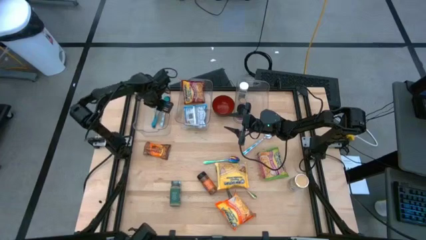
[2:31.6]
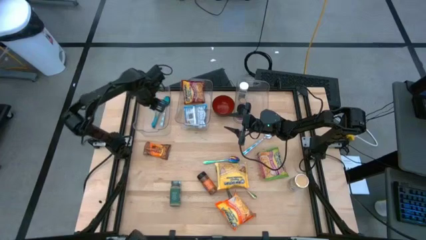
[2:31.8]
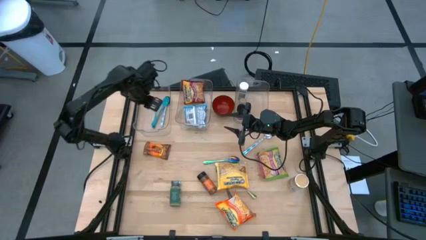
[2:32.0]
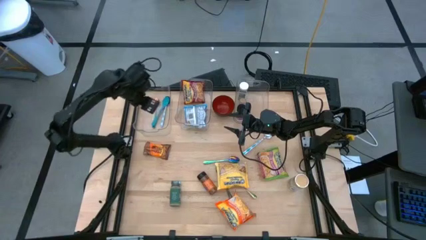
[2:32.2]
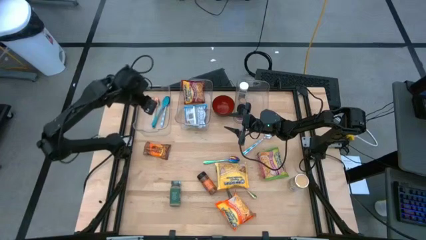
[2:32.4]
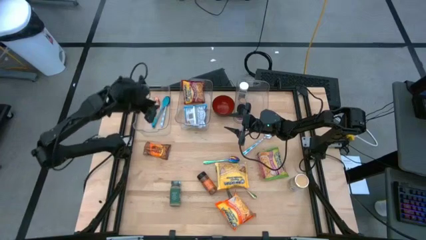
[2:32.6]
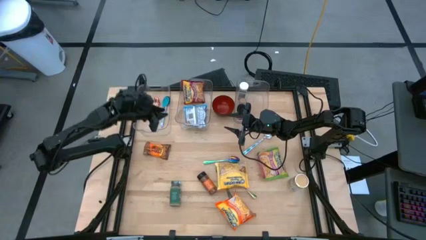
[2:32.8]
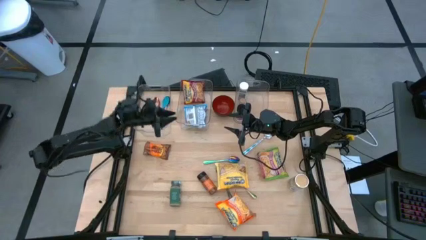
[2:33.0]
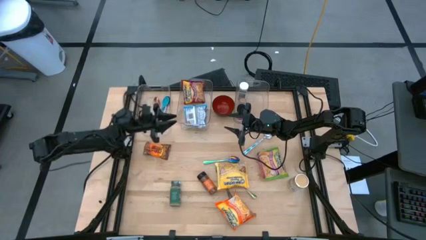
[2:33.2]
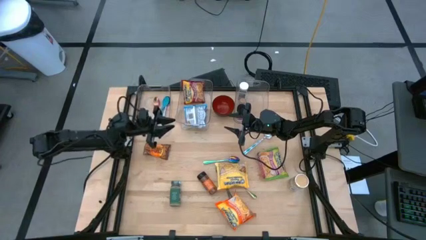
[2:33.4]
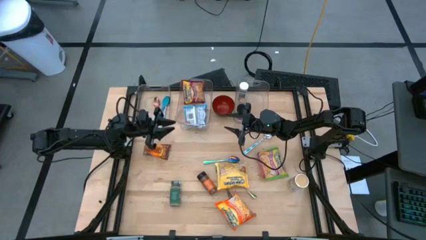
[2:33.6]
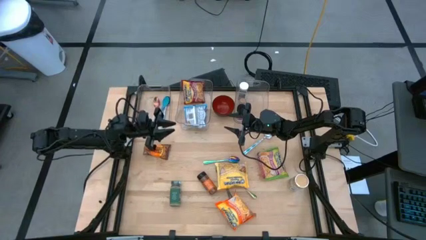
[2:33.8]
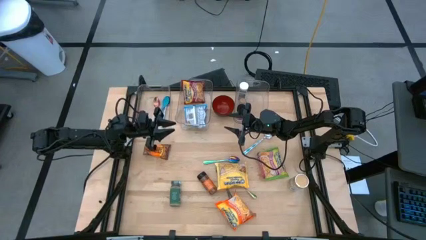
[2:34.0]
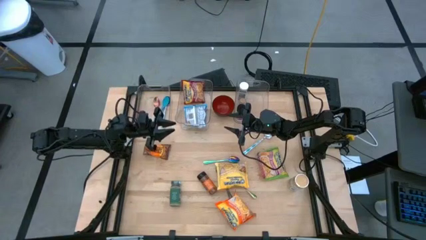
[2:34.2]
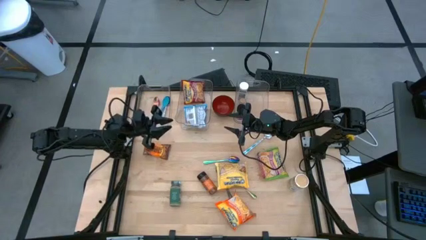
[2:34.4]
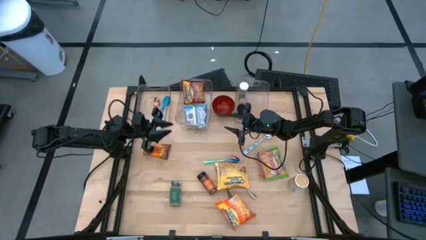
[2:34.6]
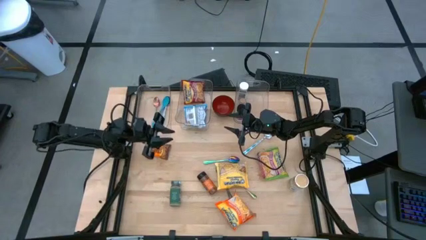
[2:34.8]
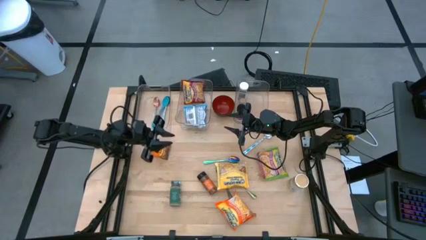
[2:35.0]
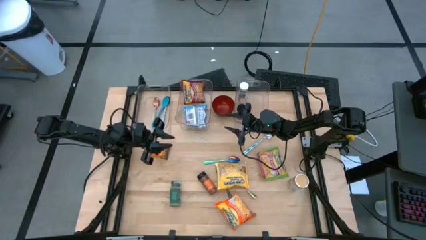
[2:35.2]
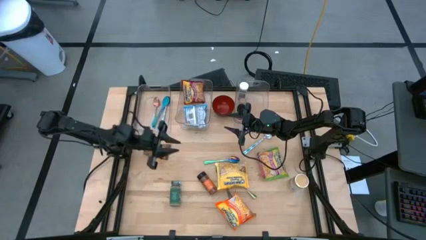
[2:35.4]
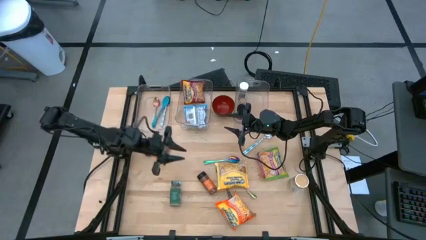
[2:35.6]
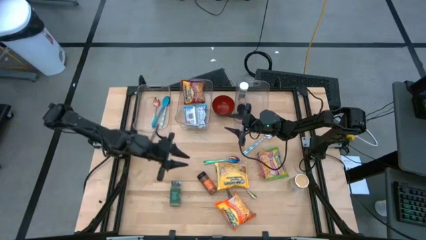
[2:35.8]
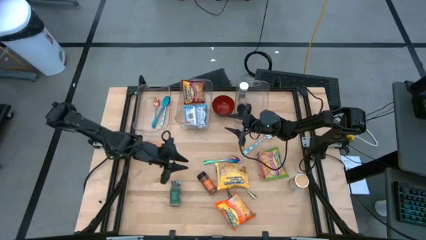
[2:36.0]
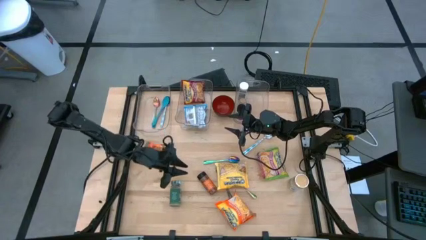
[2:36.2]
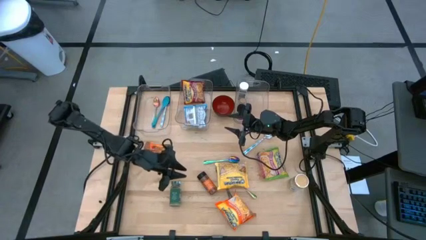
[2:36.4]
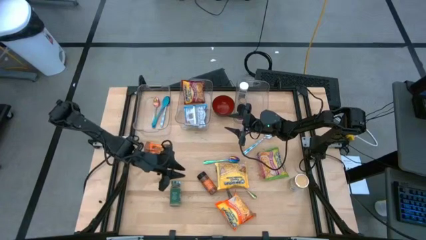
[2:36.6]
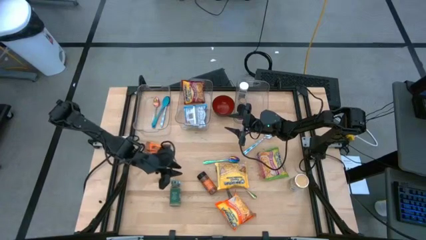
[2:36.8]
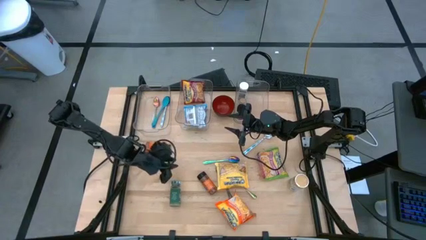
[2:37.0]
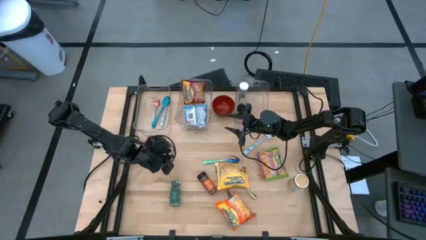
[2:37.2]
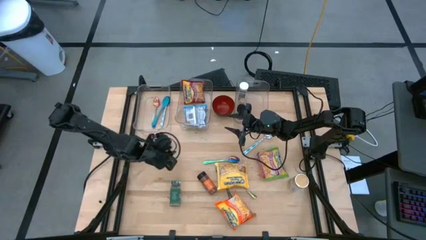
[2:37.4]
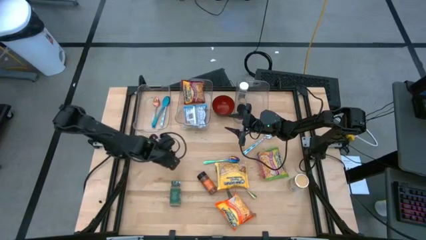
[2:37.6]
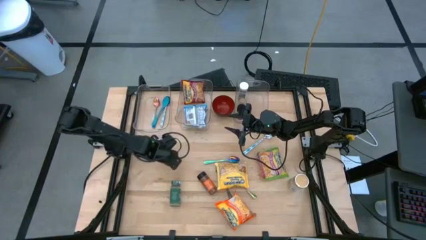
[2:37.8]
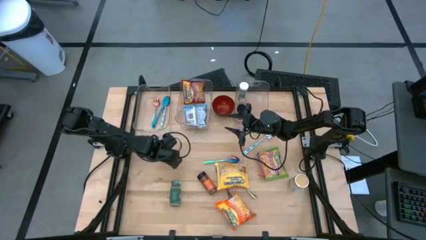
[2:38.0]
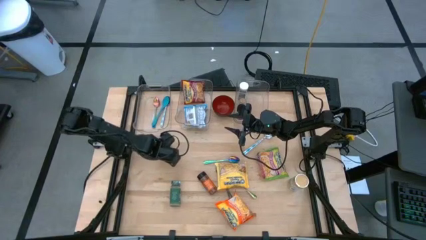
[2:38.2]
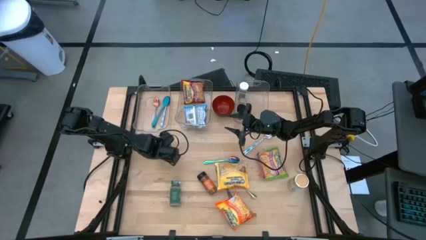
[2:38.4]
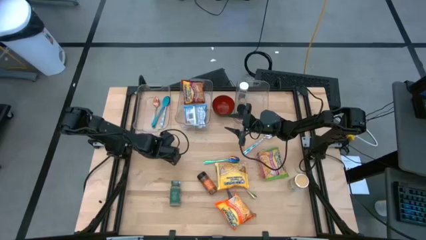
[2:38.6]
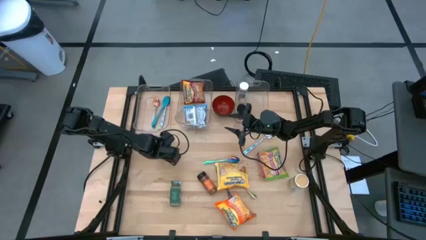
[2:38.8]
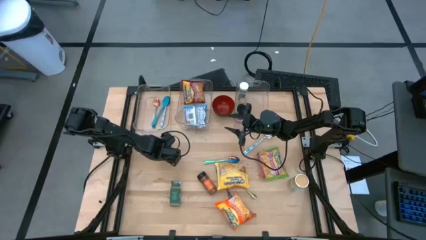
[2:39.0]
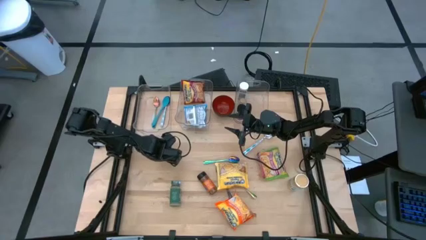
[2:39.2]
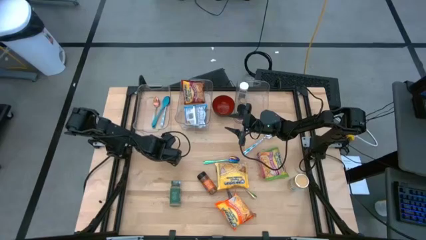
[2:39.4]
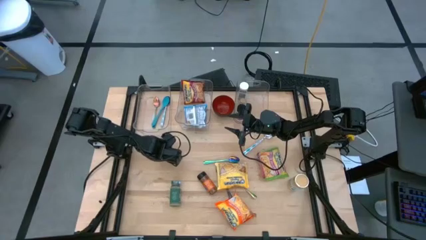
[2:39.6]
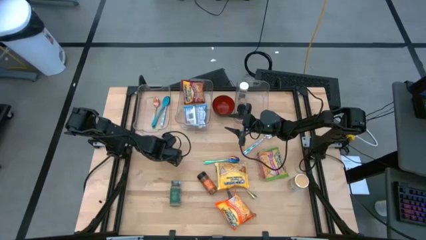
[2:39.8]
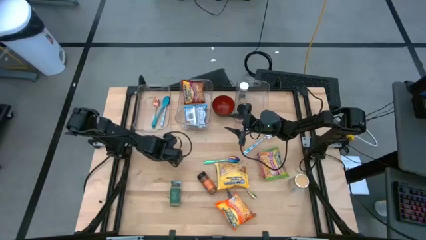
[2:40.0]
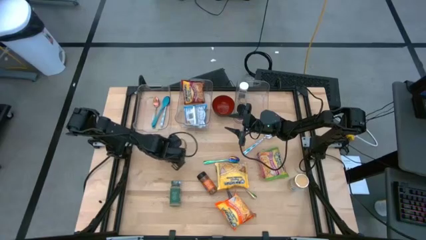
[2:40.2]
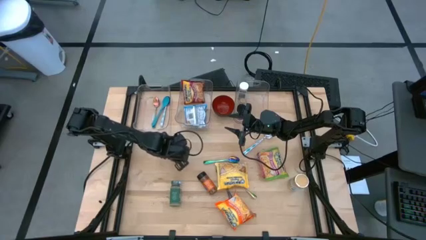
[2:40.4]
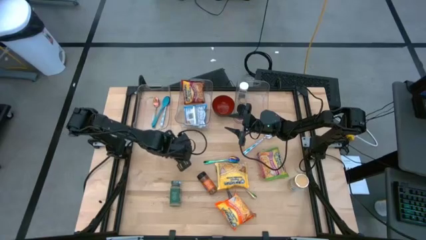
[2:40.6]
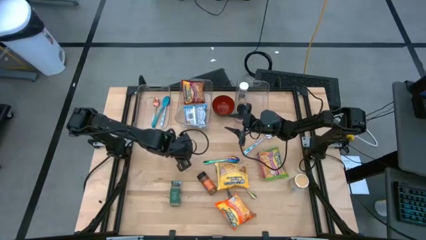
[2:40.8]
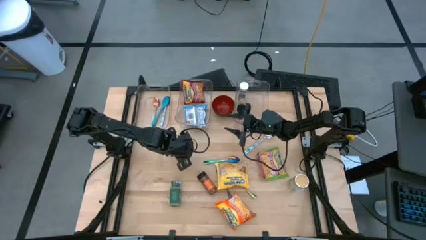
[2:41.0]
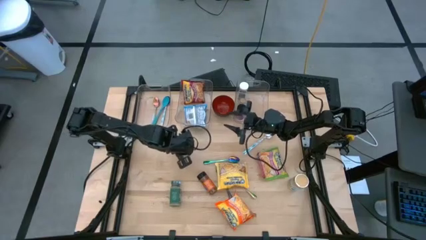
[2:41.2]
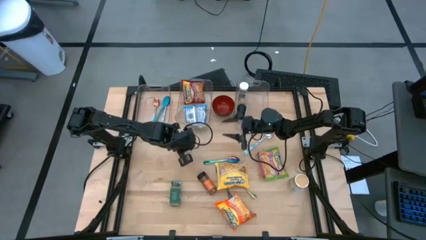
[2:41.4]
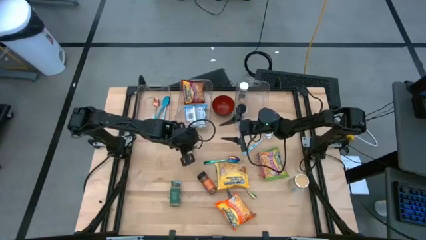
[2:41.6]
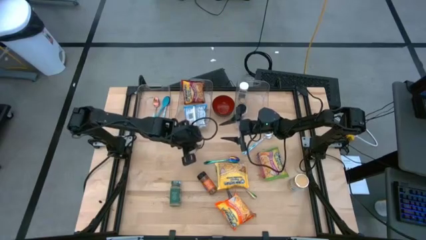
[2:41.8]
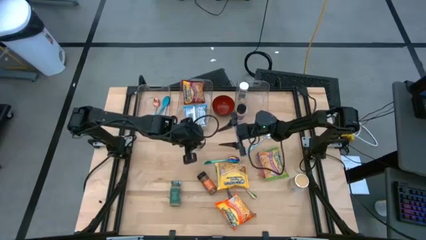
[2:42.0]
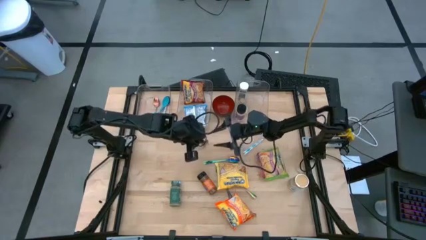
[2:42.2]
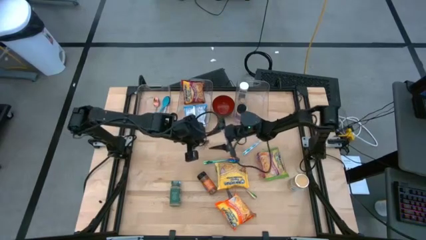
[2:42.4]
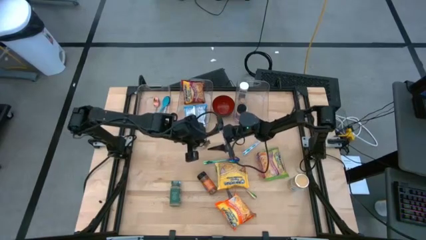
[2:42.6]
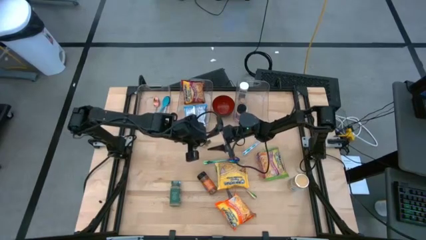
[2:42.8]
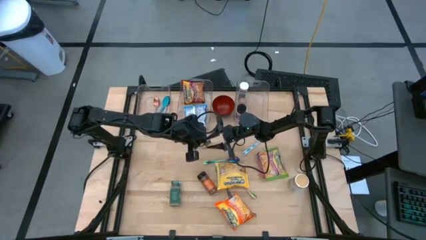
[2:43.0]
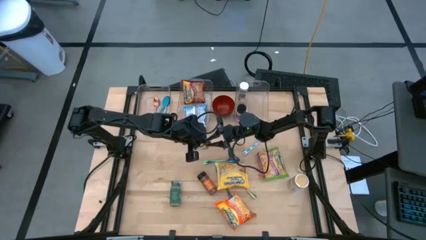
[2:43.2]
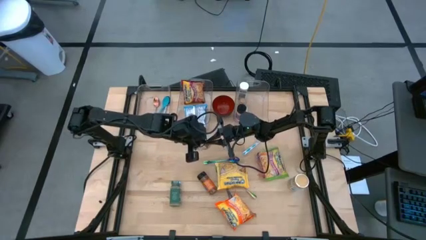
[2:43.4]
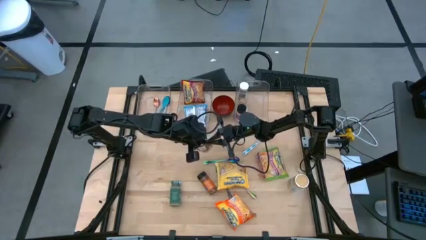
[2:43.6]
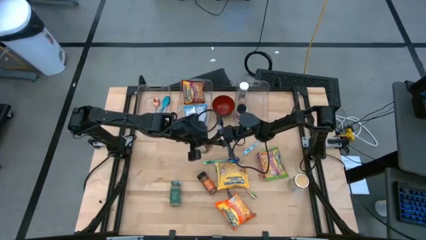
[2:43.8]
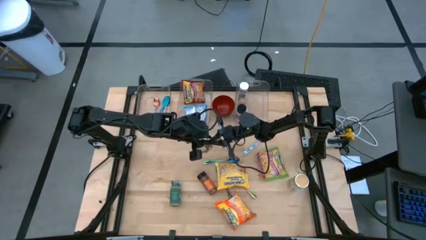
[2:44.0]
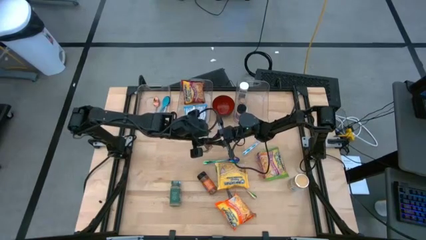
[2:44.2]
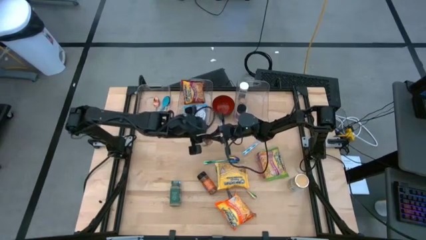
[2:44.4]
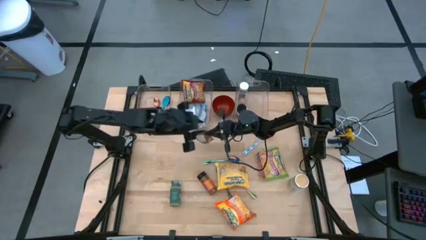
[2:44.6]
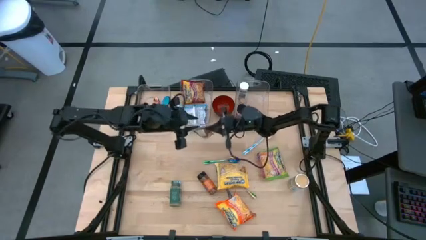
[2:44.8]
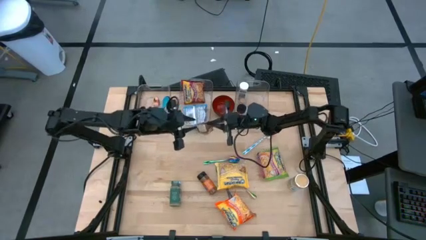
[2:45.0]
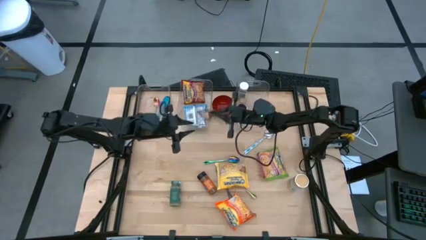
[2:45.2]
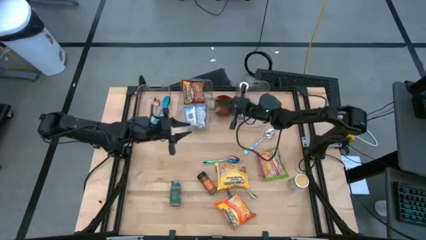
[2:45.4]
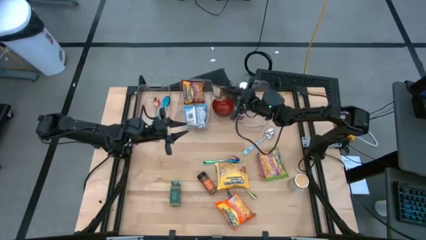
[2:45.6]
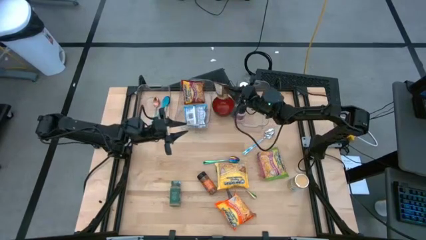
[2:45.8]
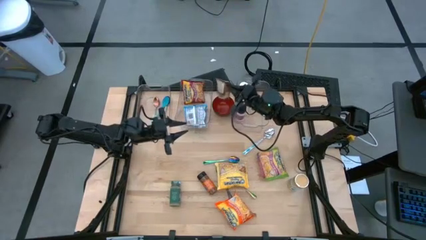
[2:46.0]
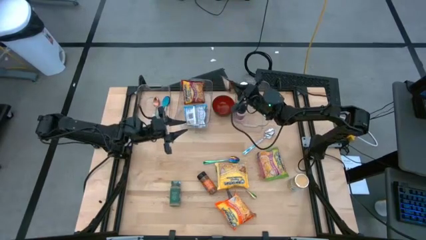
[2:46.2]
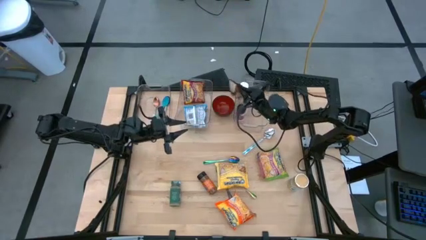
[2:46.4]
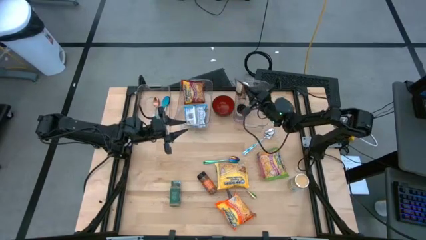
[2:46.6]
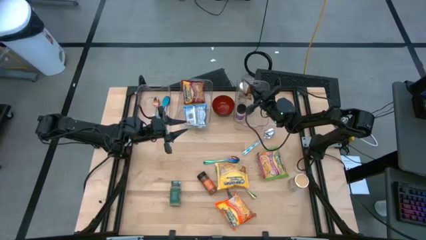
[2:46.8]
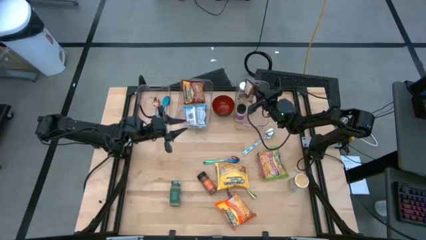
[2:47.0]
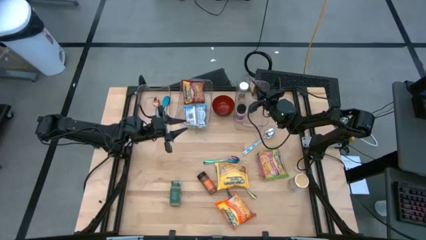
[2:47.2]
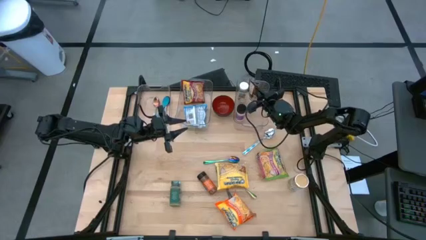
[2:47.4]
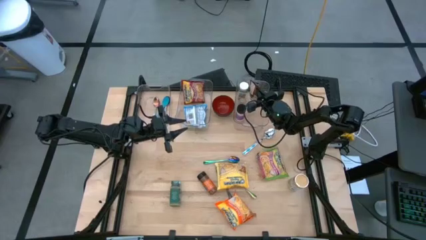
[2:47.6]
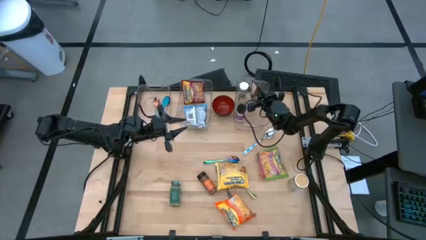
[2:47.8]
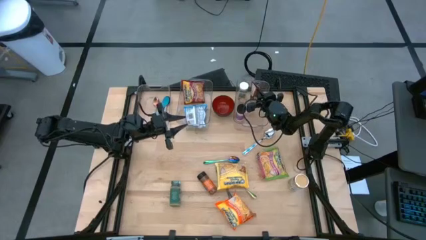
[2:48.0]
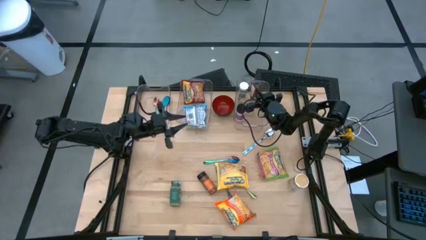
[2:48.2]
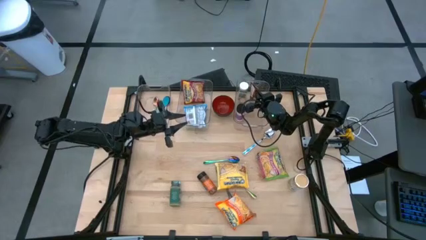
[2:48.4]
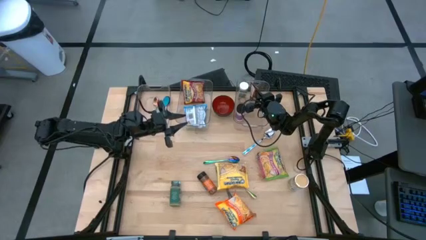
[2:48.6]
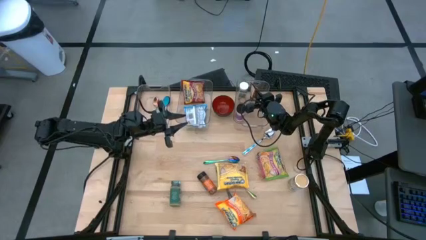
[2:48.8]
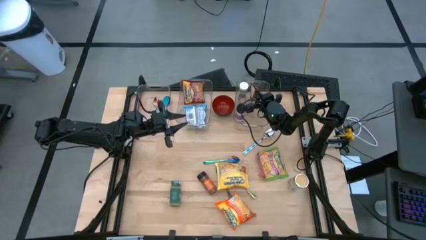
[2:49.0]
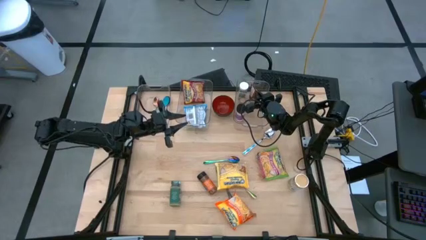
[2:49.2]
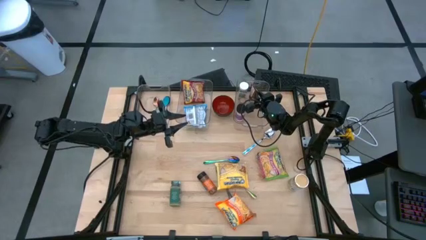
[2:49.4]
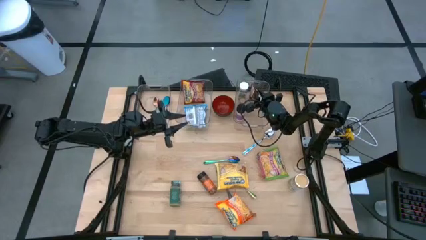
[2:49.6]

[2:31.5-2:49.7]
Task: Pick & Place Food Item
Put the orange seasoning pack into the right transparent bin
